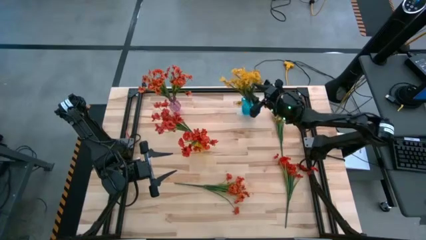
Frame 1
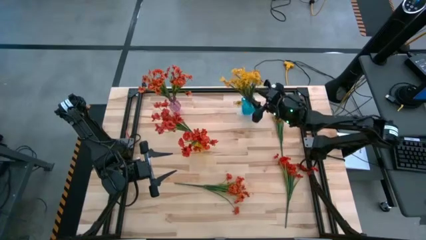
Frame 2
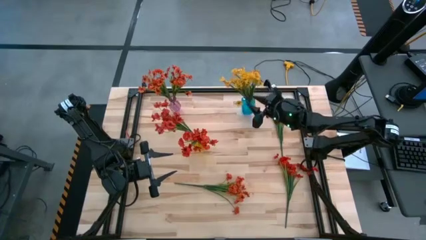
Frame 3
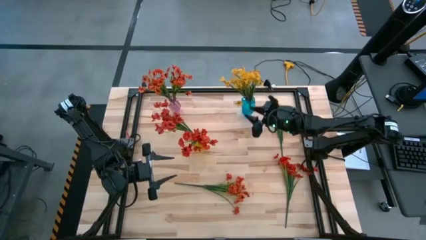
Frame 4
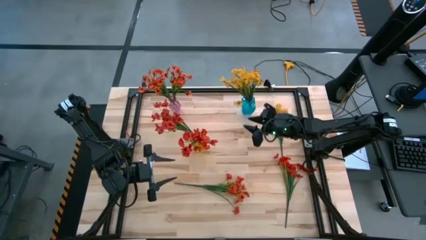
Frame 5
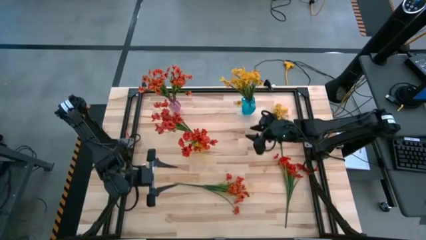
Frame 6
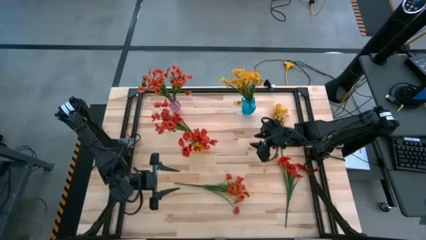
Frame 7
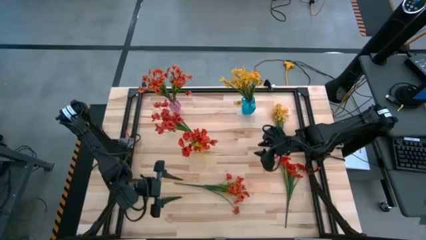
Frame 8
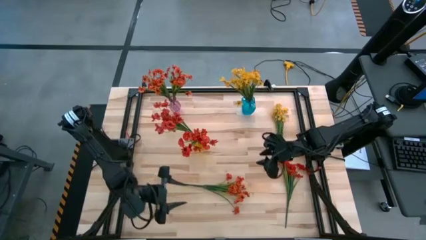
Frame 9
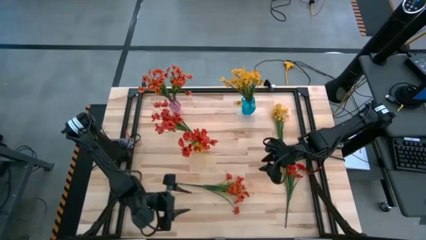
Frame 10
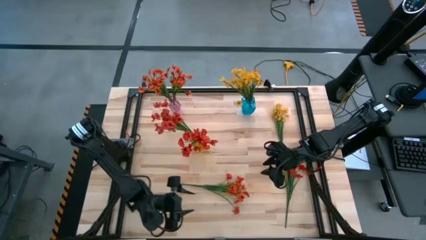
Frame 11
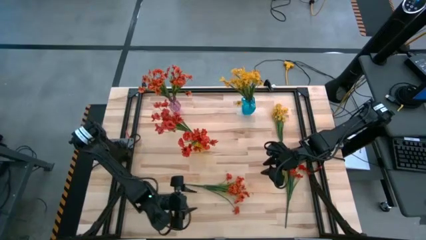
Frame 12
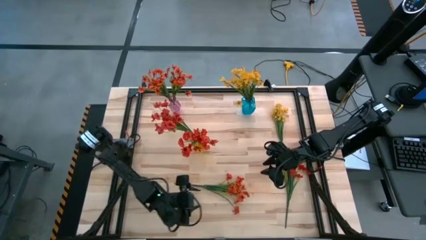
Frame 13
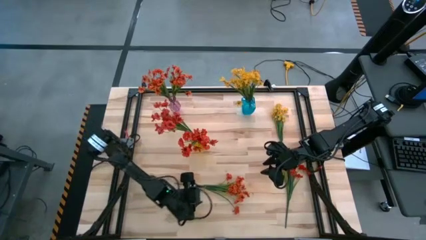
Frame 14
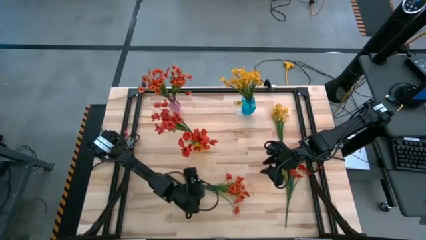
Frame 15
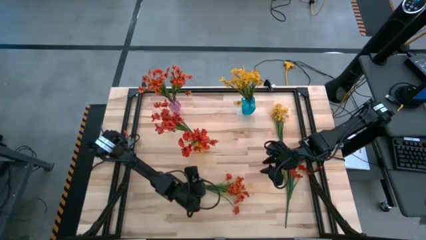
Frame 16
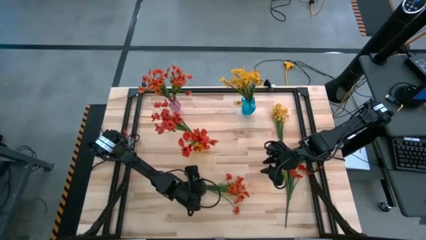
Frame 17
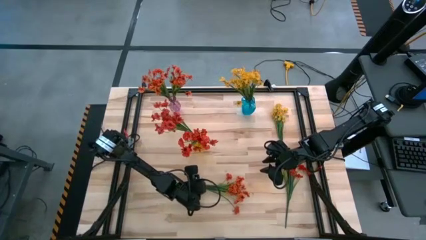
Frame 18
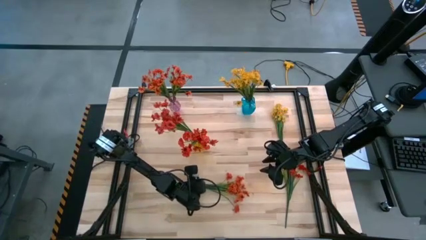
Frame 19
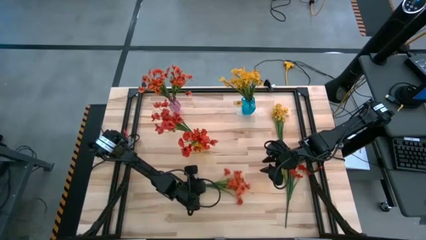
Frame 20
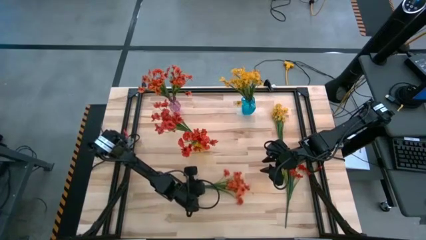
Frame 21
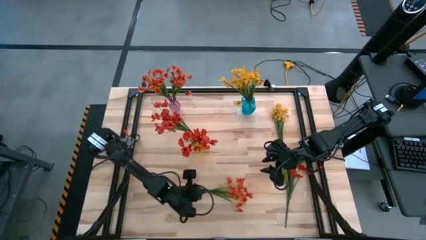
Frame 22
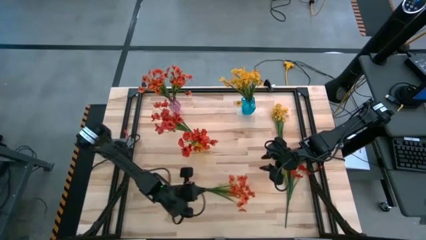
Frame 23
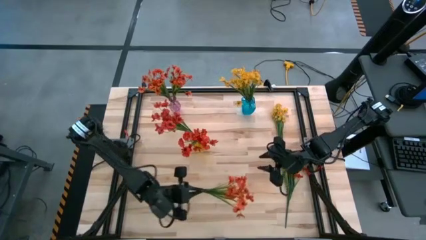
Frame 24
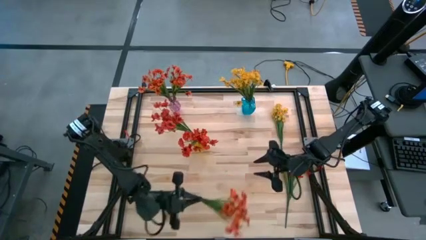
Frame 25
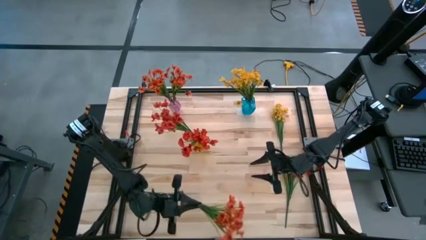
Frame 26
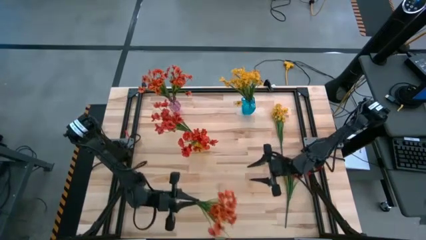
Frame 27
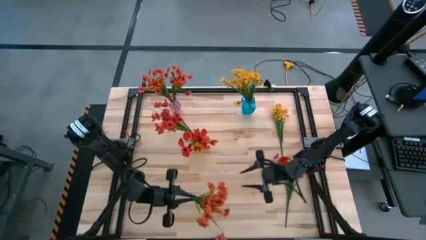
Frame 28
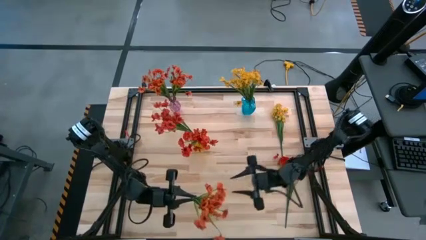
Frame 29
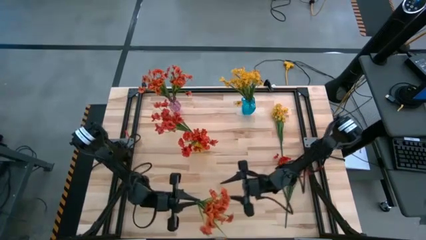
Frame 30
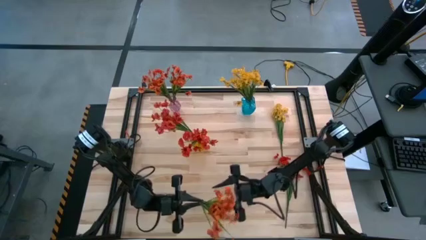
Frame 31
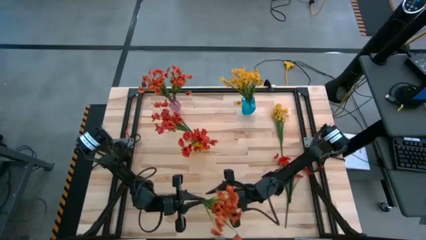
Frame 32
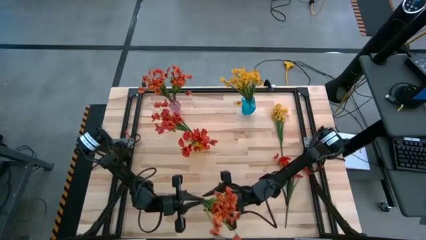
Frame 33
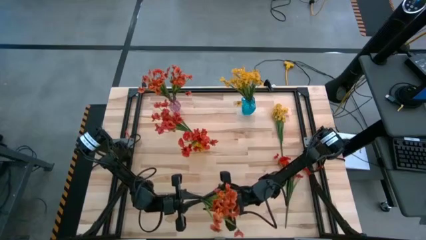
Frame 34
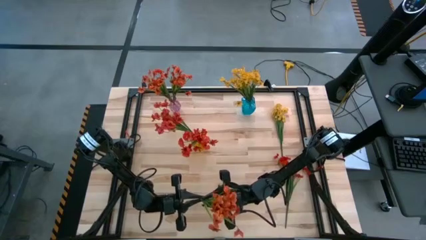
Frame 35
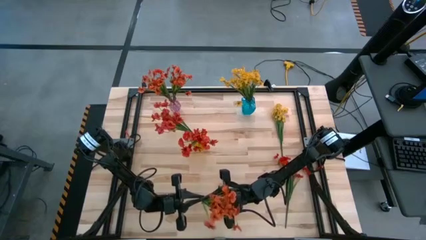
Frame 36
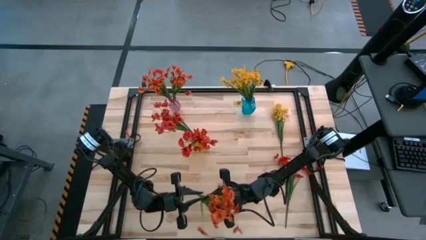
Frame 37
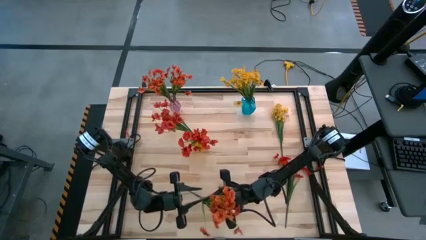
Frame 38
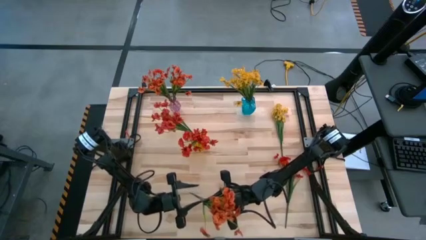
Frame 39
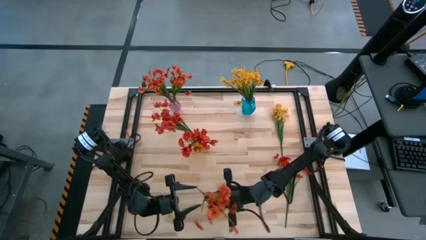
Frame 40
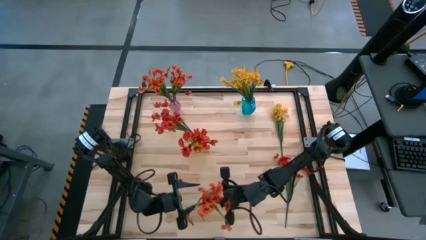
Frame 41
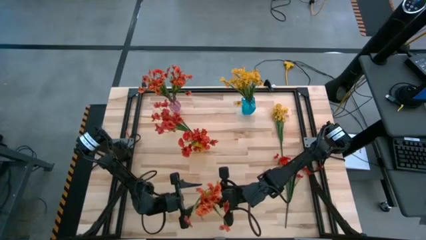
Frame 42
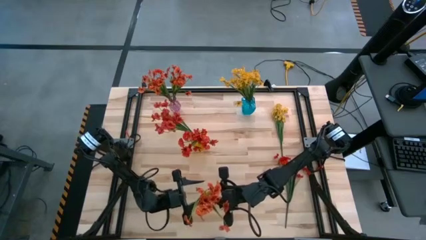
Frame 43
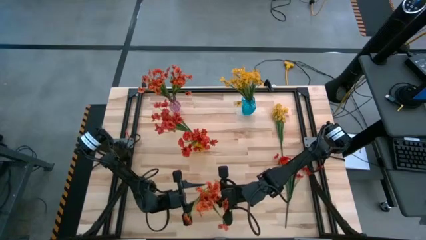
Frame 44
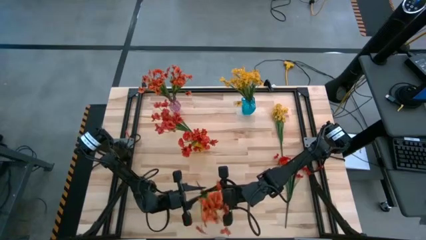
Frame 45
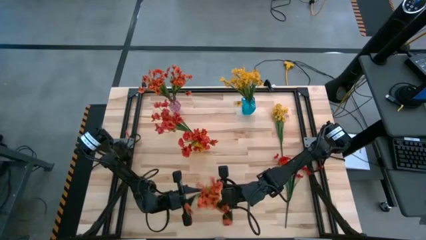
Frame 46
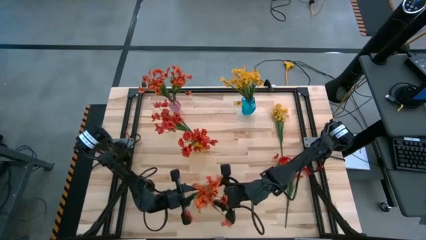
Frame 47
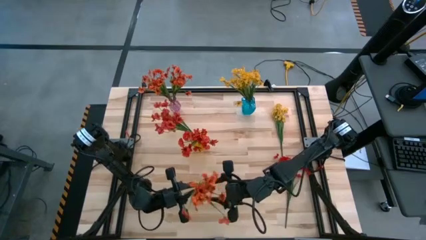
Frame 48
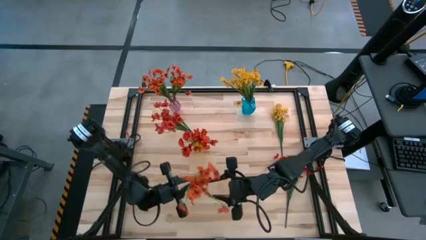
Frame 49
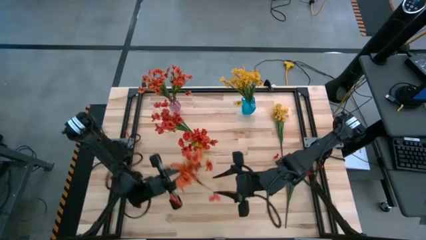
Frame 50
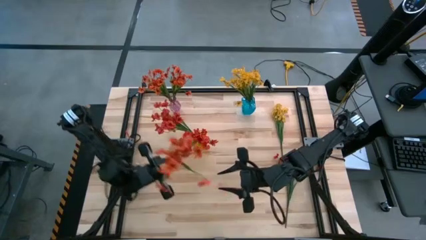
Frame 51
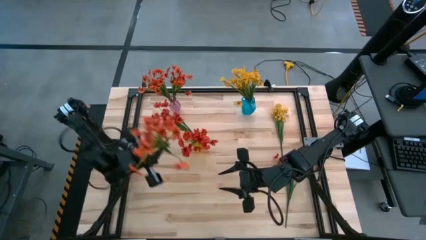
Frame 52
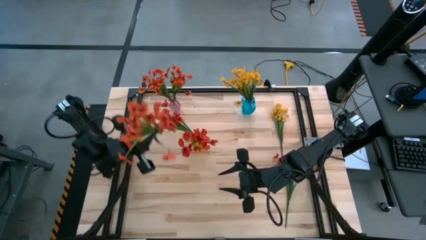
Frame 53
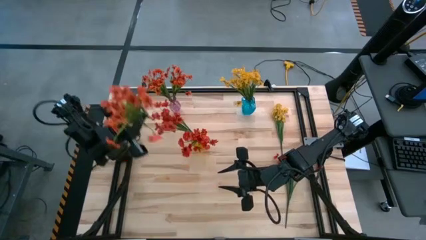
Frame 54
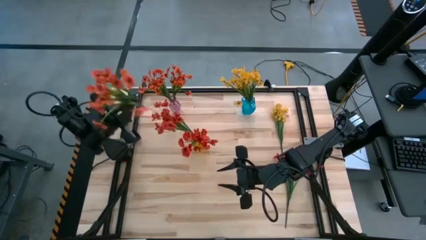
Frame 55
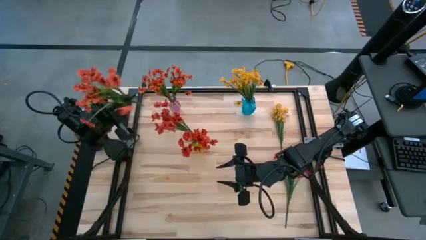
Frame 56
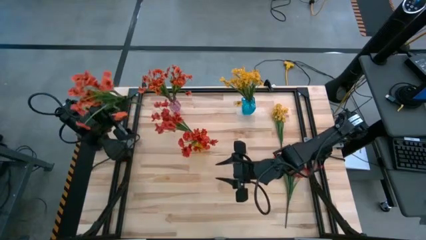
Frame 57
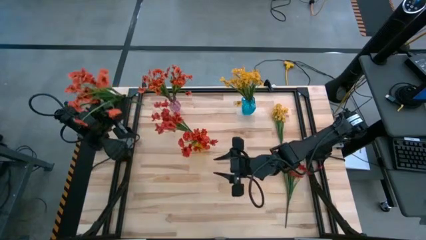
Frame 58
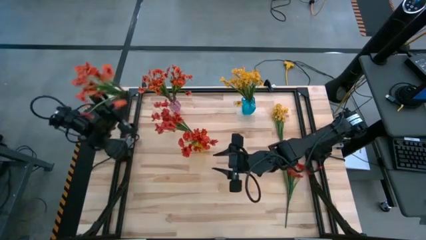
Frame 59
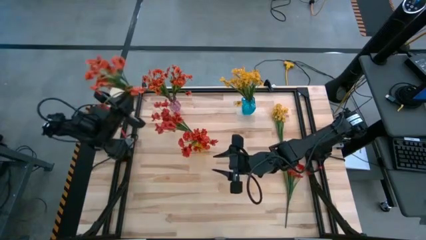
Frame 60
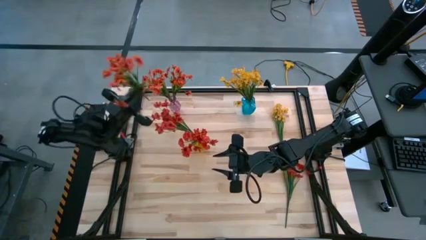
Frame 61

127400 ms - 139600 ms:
Task: Sort flowers into vase by color
Put the orange flower into the pink vase

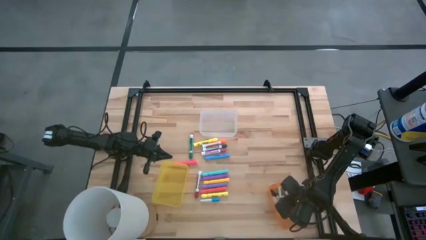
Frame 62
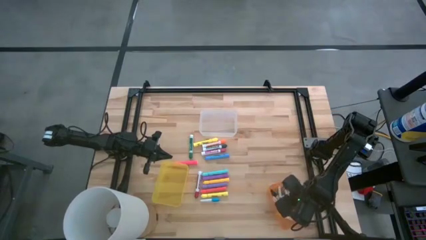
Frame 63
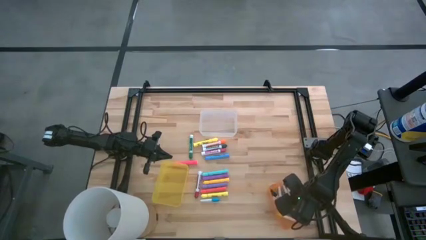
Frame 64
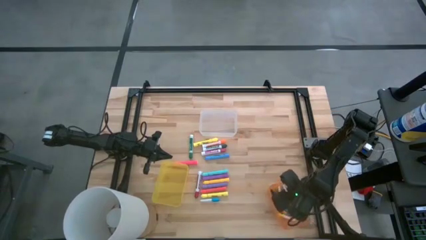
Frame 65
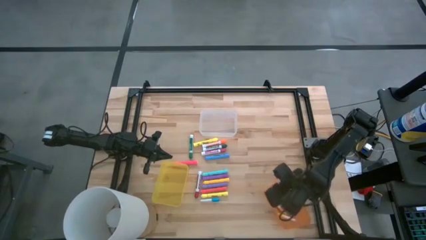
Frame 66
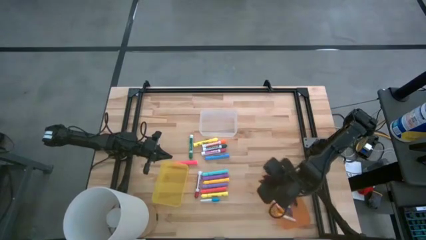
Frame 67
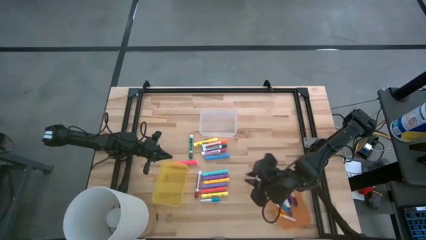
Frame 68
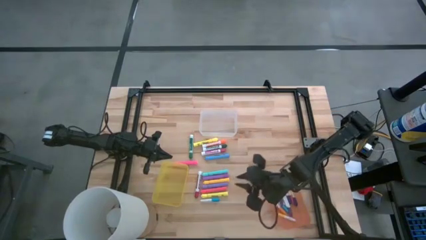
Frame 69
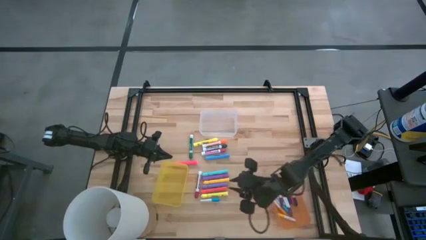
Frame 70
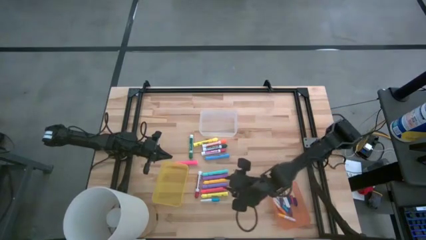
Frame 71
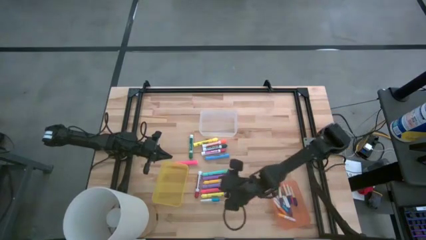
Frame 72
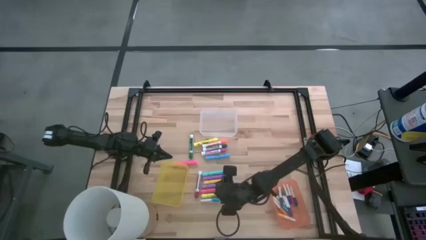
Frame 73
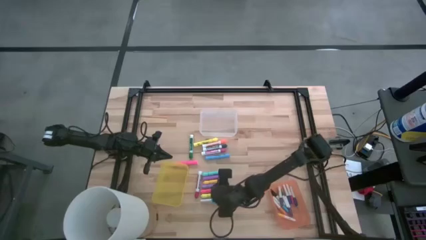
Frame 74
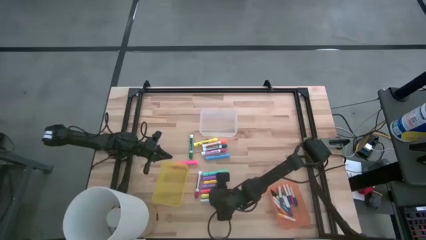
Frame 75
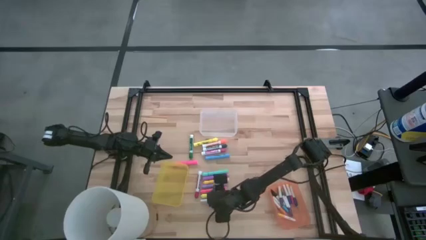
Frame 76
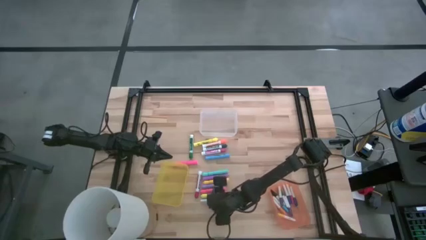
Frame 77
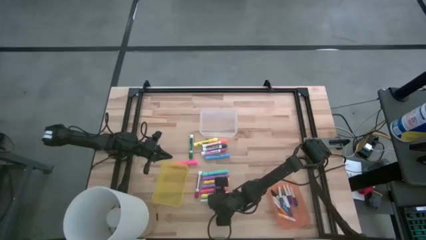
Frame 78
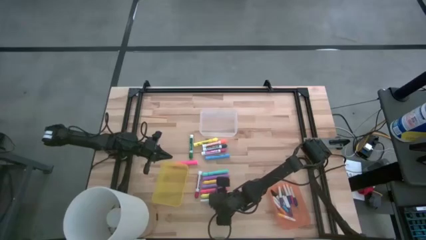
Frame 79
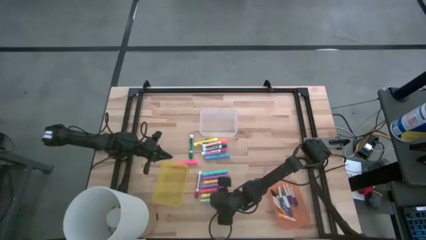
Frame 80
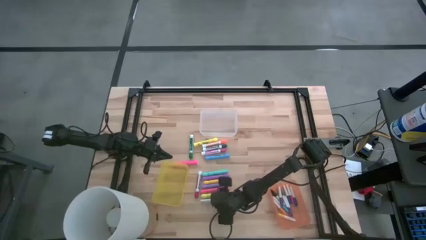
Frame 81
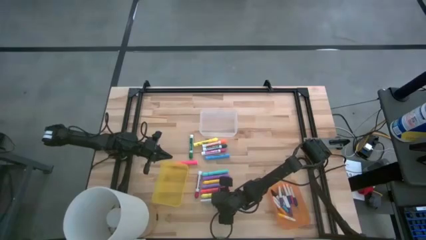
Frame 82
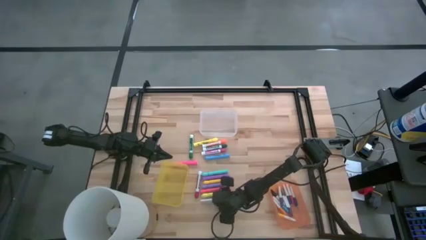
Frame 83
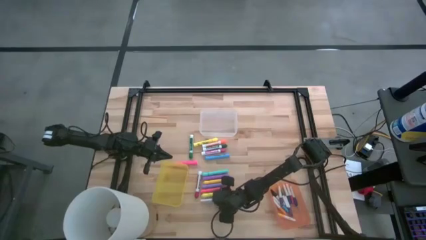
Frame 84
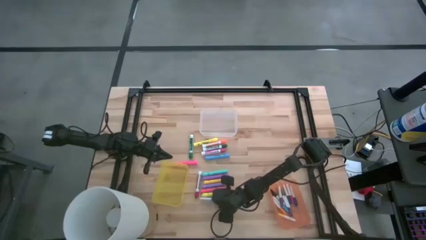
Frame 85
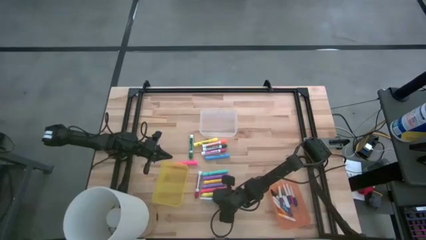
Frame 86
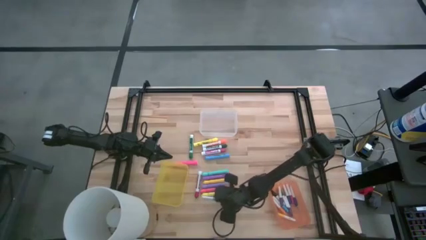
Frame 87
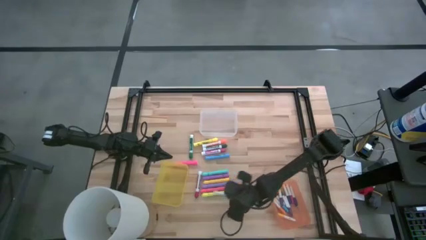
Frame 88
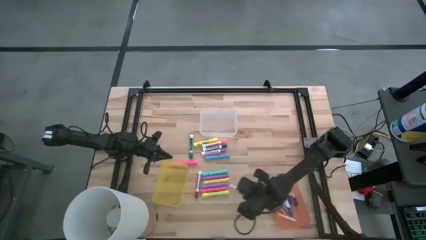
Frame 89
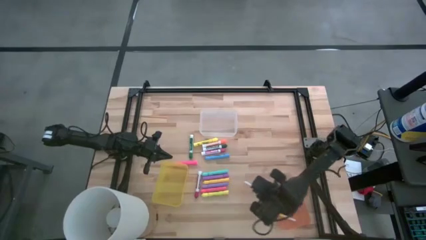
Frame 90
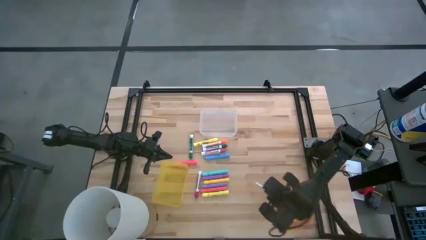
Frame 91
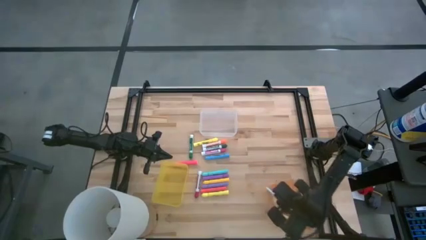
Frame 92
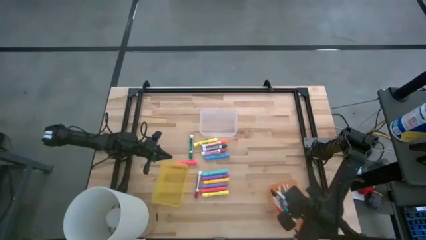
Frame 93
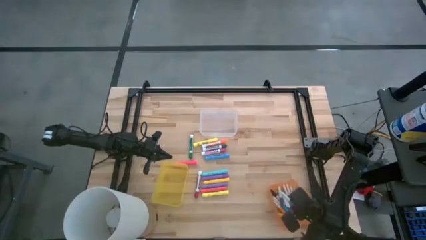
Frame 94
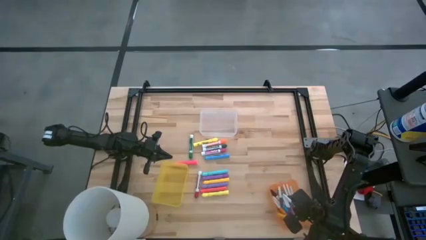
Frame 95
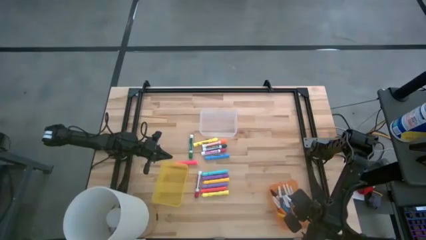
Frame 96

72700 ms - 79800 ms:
Task: Pick & Place Markers
Put the small blue highlighter pen into the orange bin
